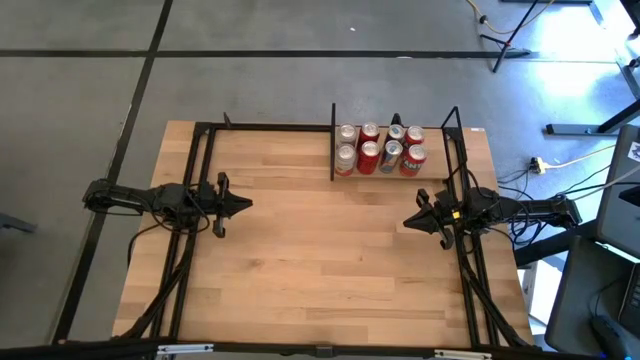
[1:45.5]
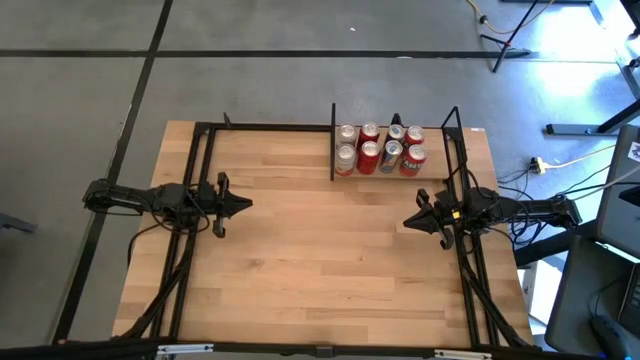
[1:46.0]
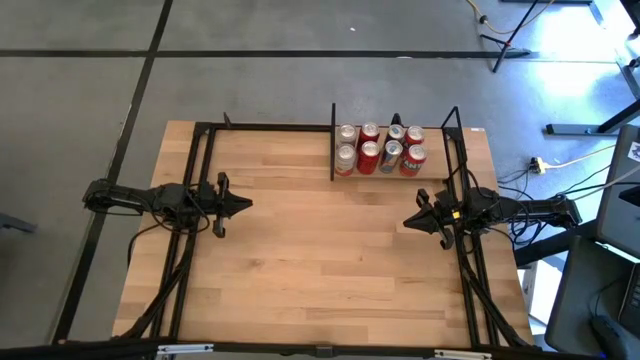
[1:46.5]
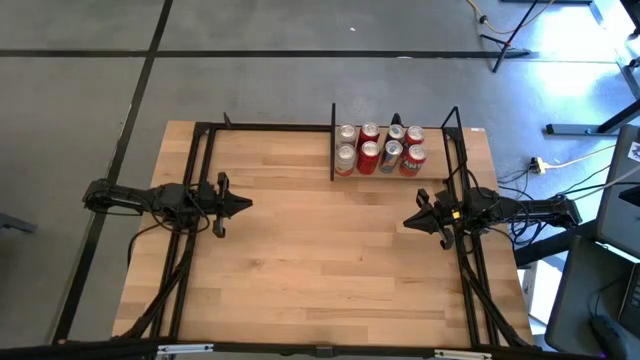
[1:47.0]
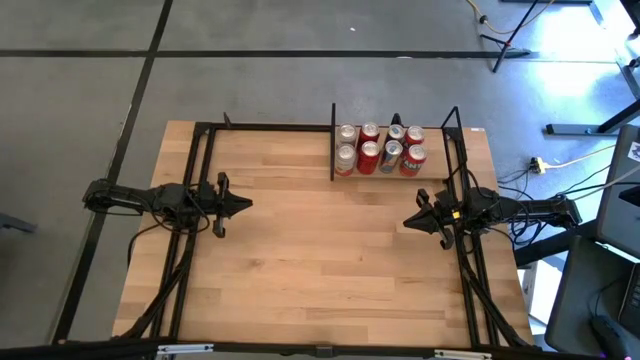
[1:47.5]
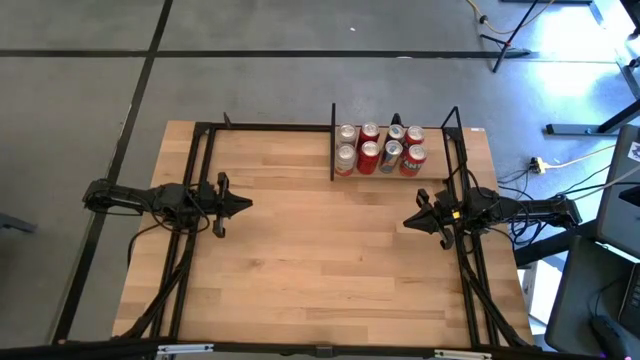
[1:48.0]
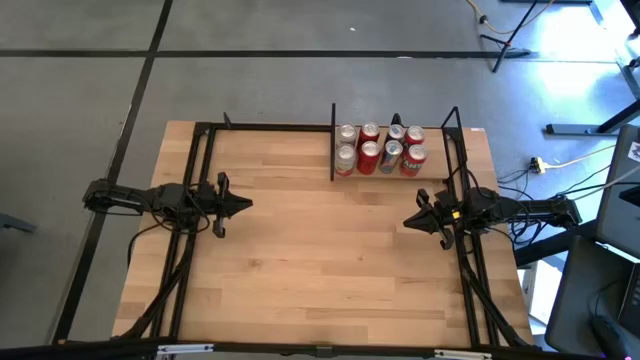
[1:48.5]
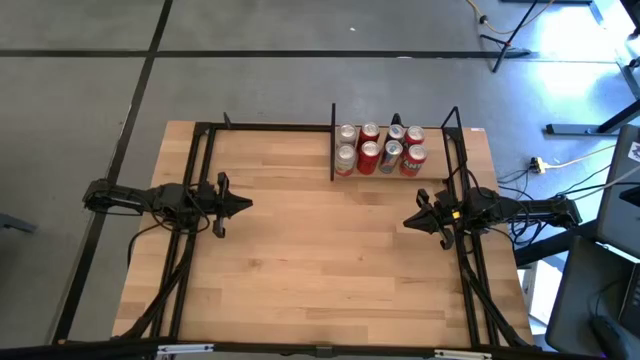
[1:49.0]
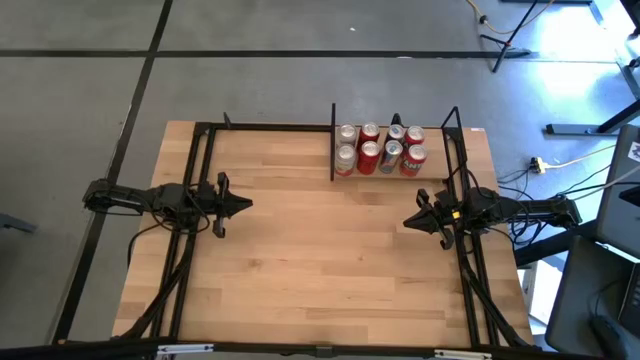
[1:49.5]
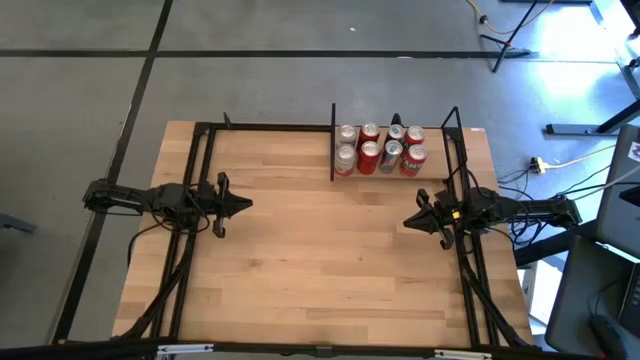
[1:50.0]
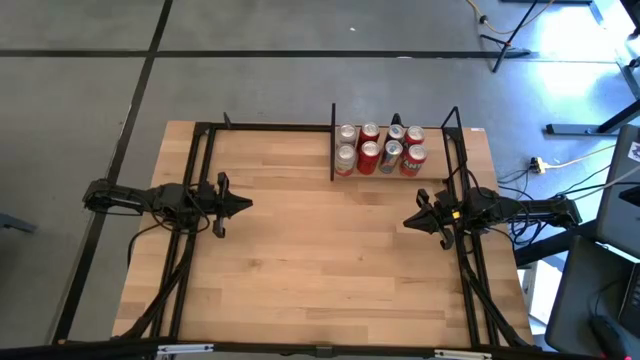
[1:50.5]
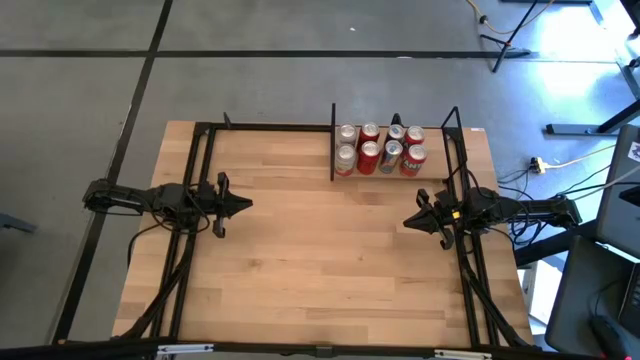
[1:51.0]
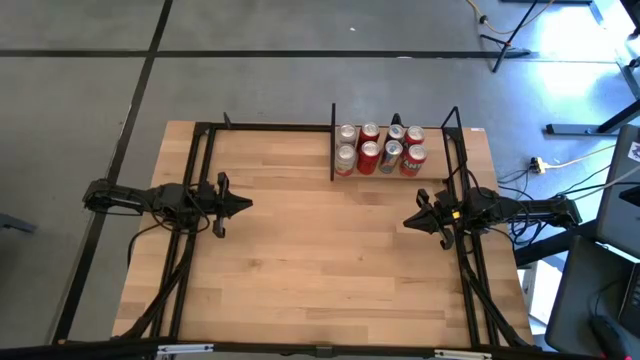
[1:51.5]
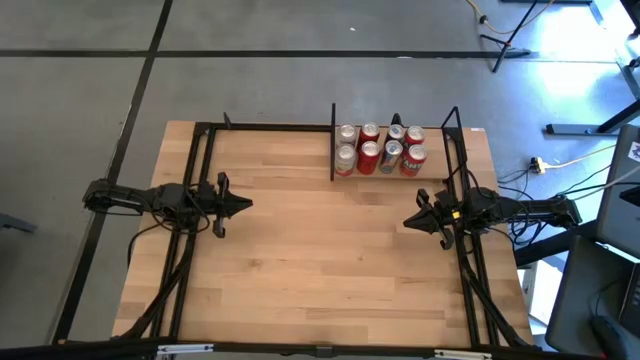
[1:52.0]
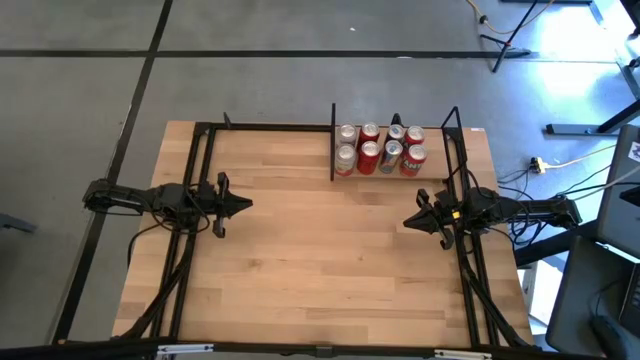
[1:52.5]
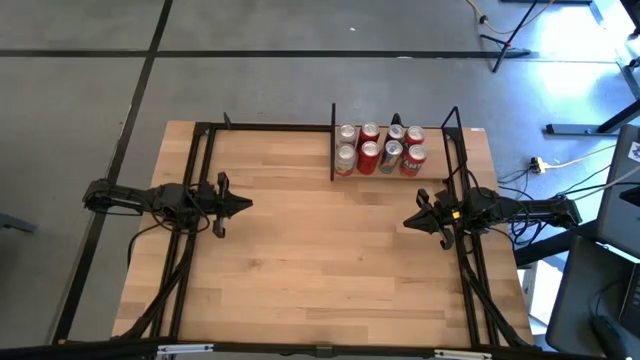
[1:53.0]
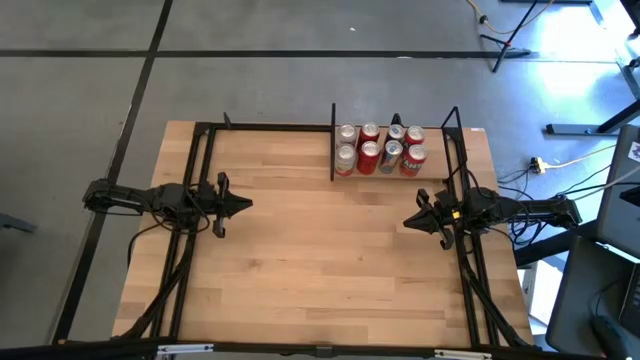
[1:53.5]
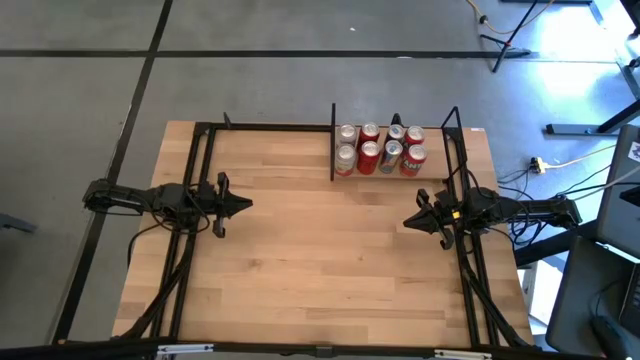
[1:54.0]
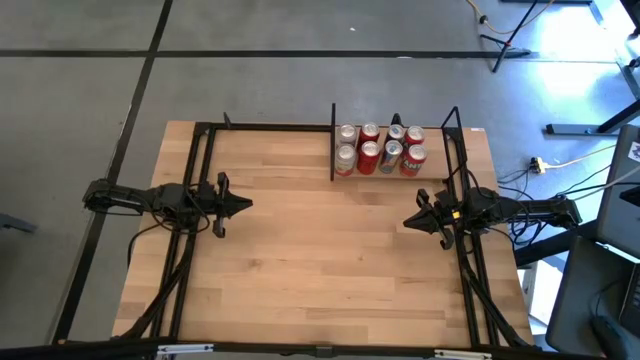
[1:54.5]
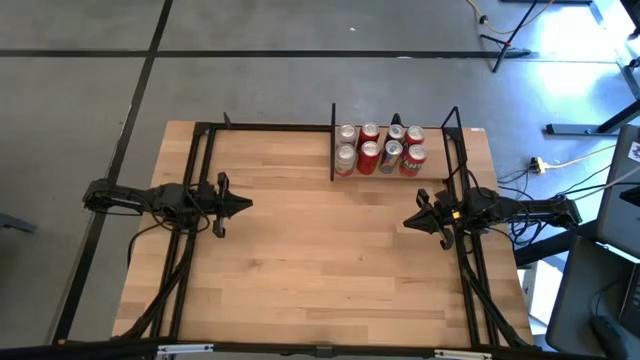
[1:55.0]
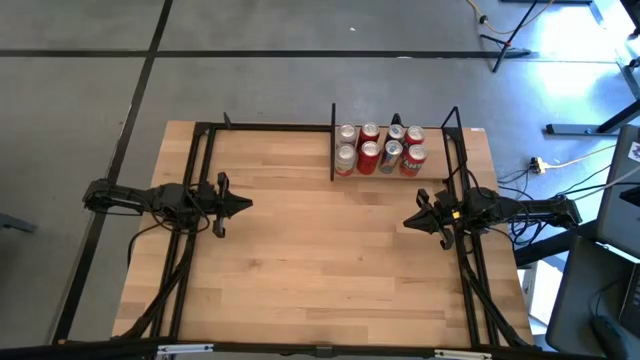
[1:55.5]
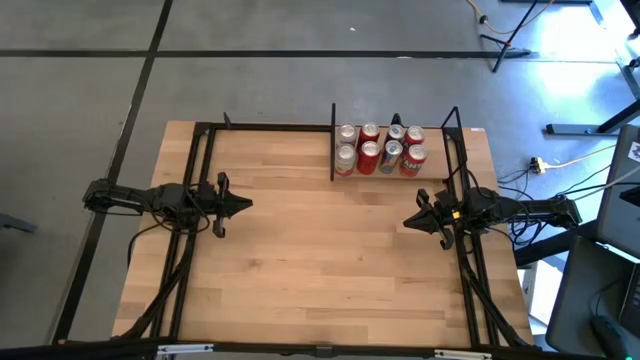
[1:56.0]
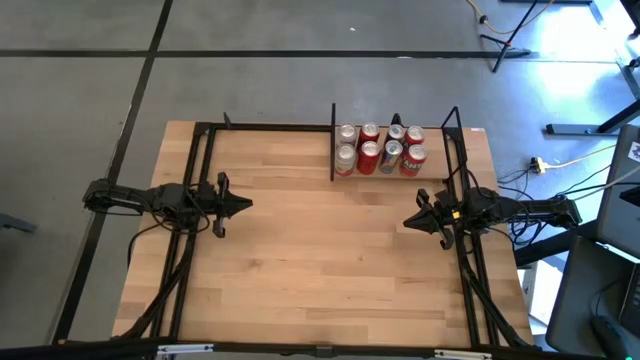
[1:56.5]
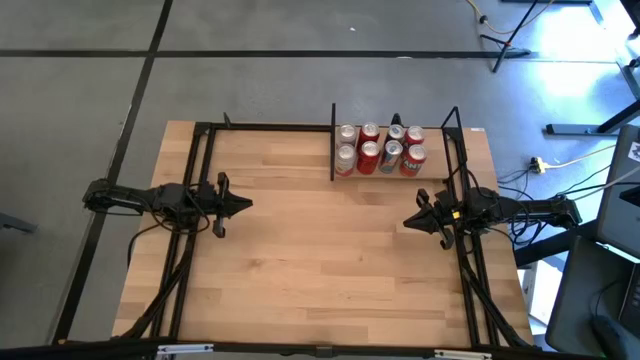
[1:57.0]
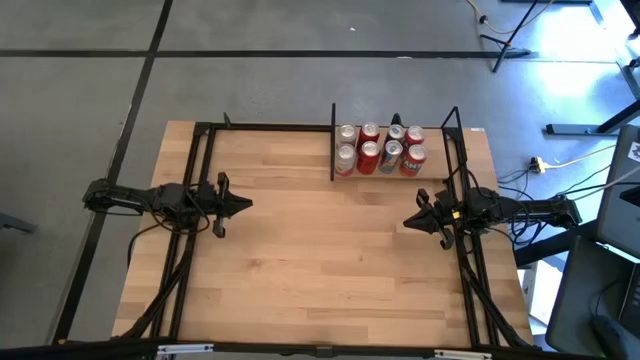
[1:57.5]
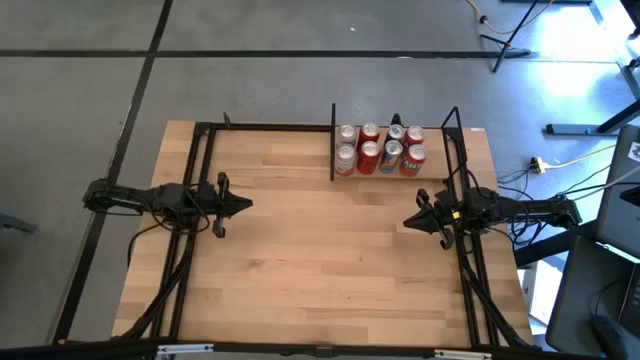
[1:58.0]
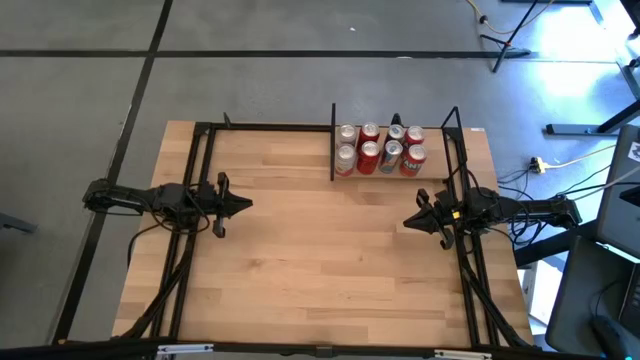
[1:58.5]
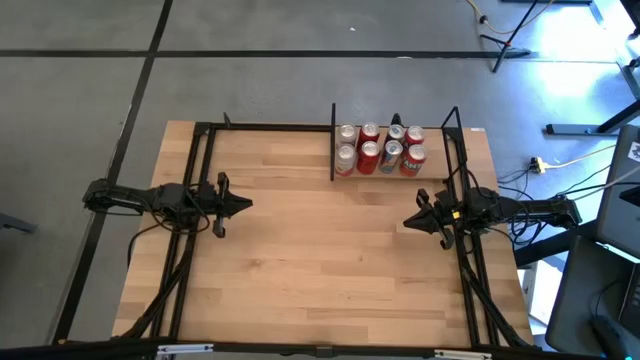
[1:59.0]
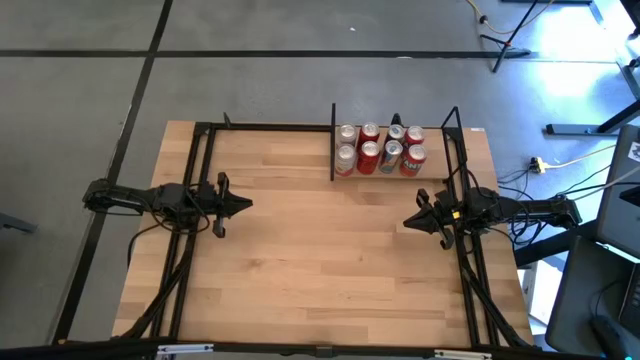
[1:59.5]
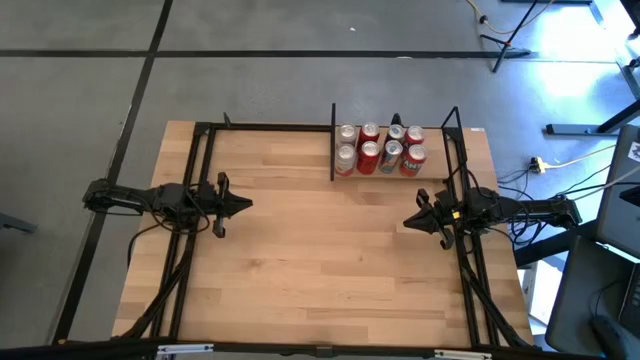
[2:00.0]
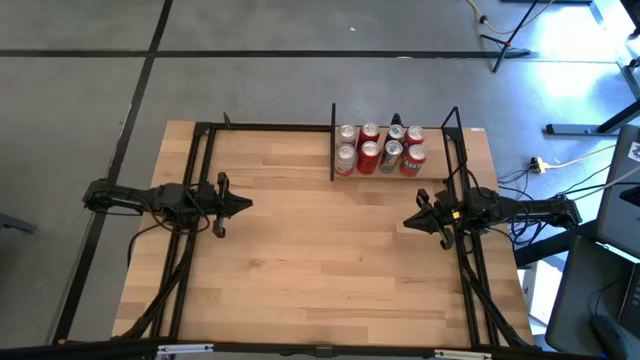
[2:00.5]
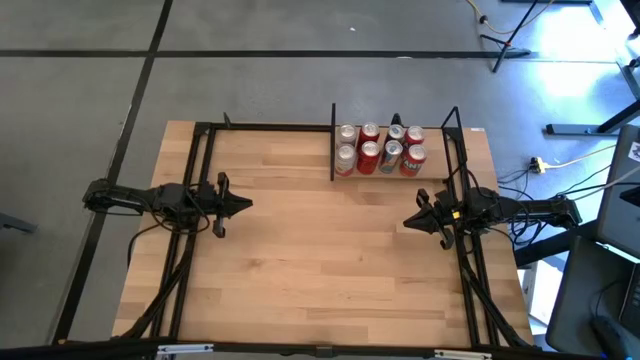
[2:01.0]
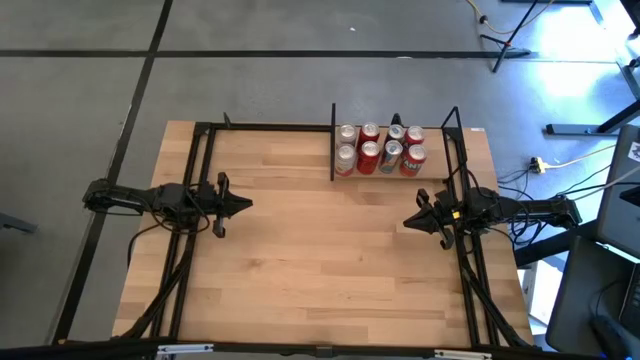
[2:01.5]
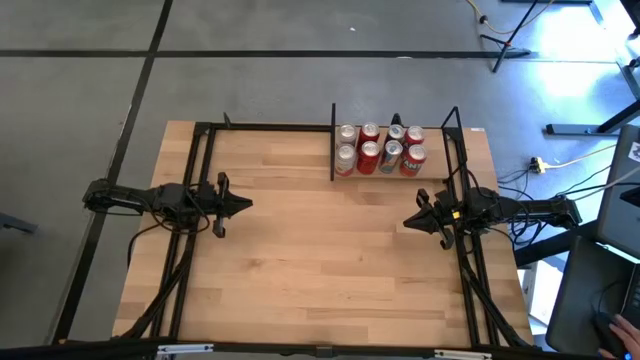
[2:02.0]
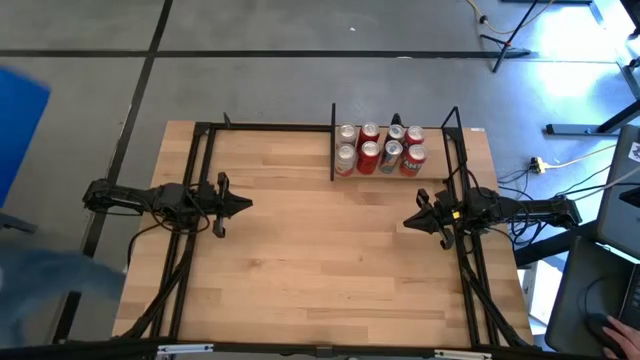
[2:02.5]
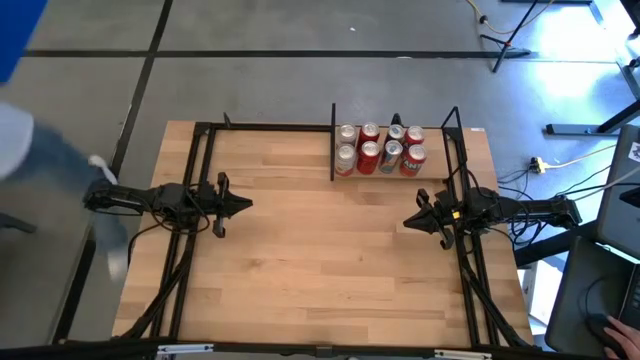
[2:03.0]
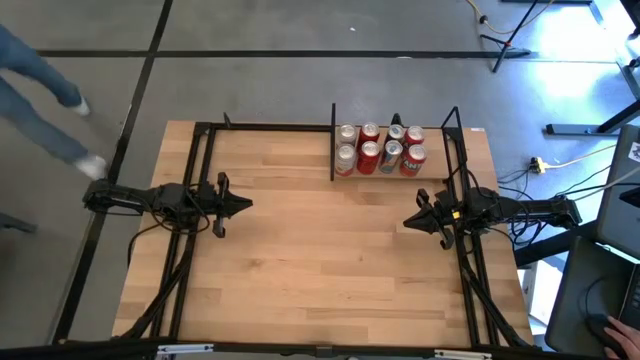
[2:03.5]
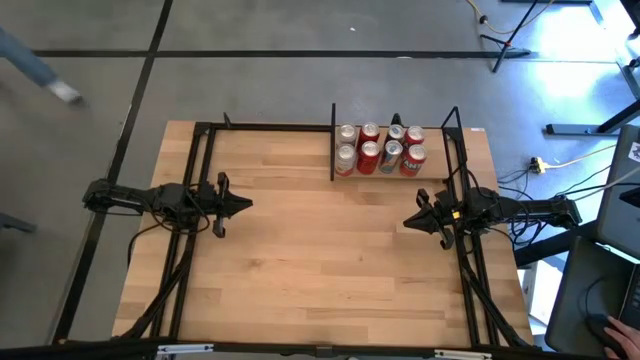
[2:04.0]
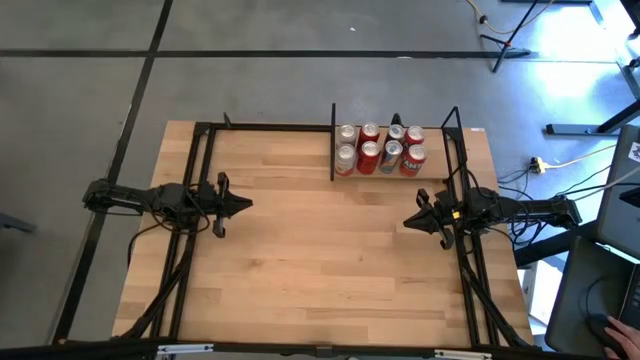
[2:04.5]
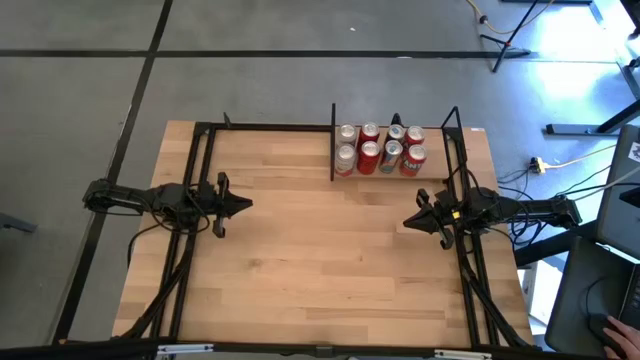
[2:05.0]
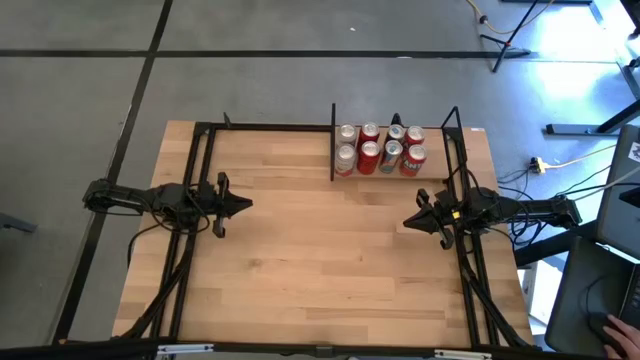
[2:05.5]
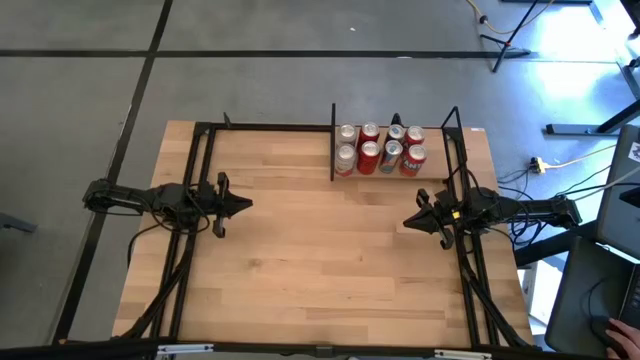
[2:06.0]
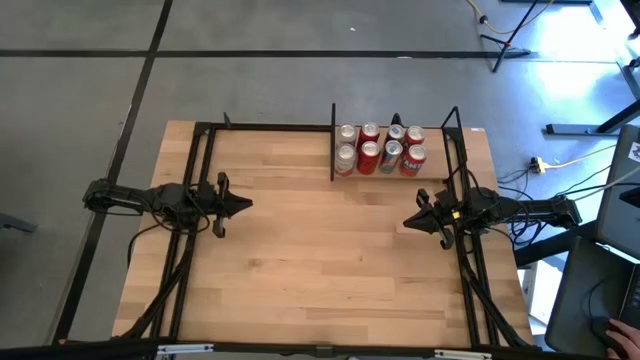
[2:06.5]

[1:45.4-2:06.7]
Task: Place canned beverage on shelf
Return to Home Position
